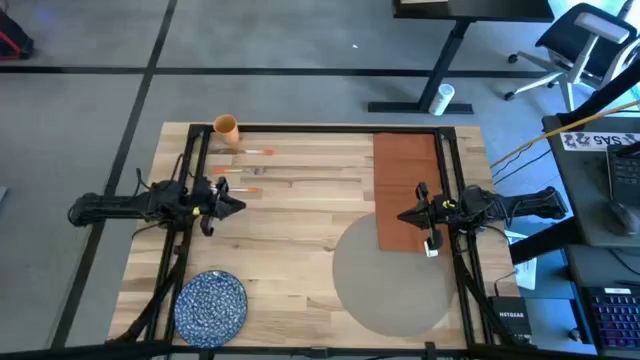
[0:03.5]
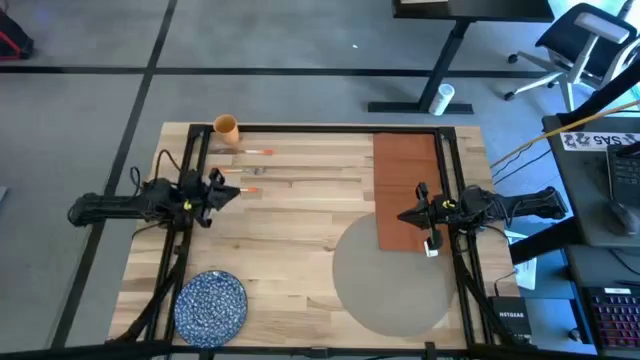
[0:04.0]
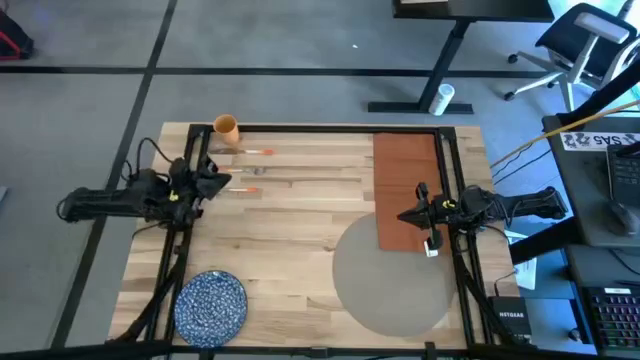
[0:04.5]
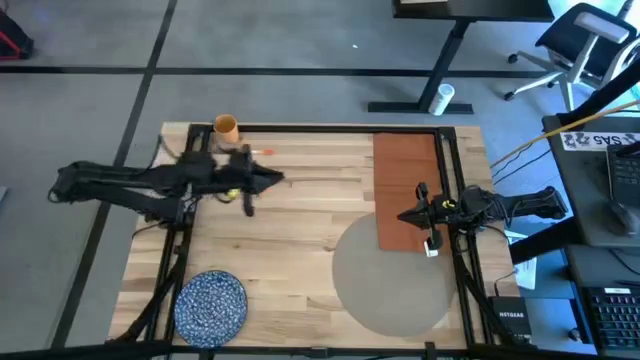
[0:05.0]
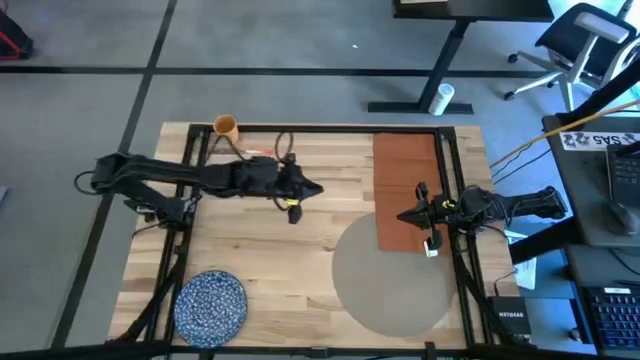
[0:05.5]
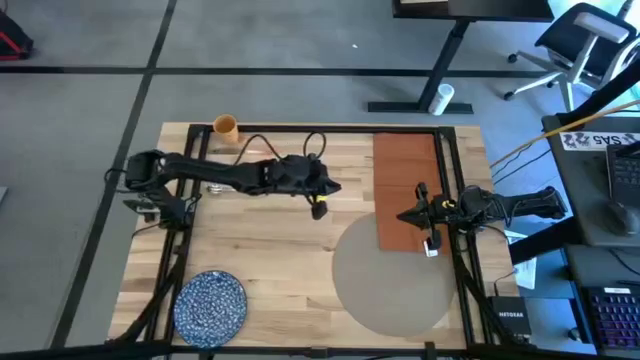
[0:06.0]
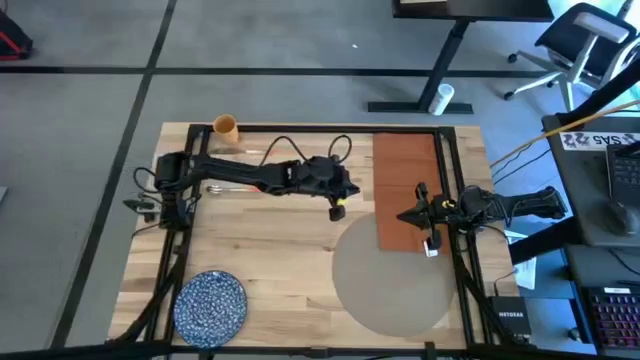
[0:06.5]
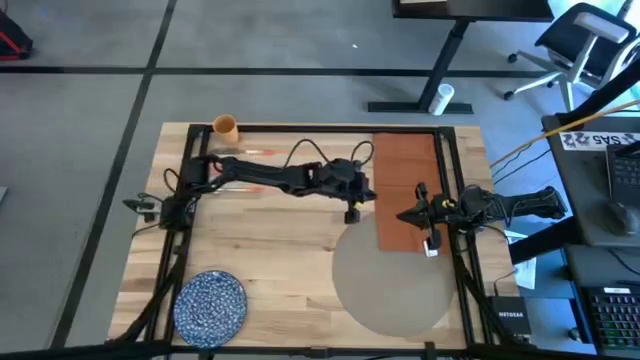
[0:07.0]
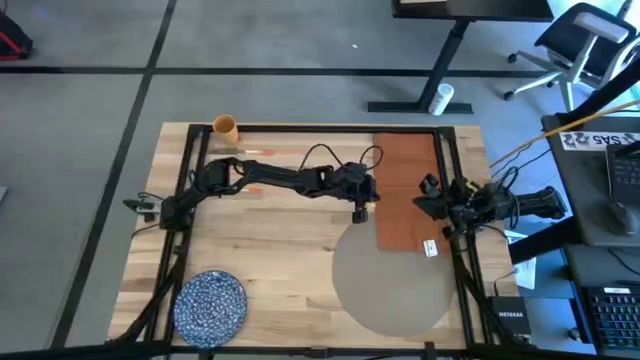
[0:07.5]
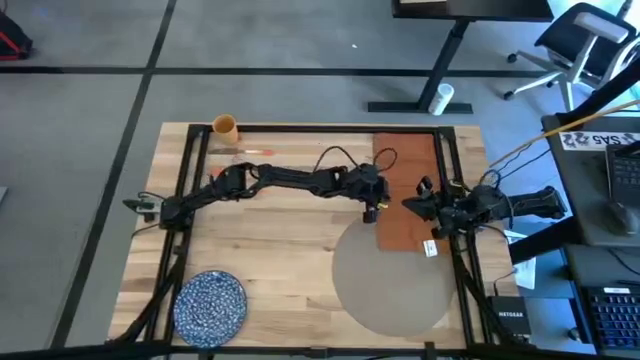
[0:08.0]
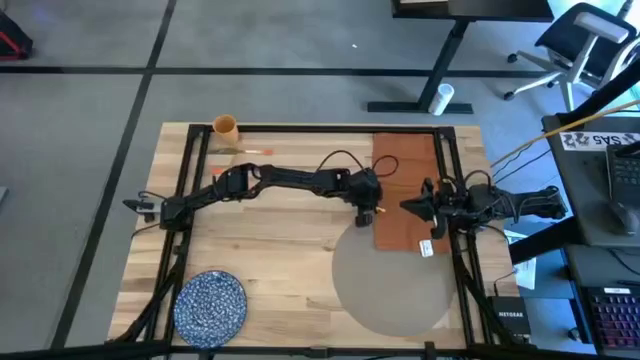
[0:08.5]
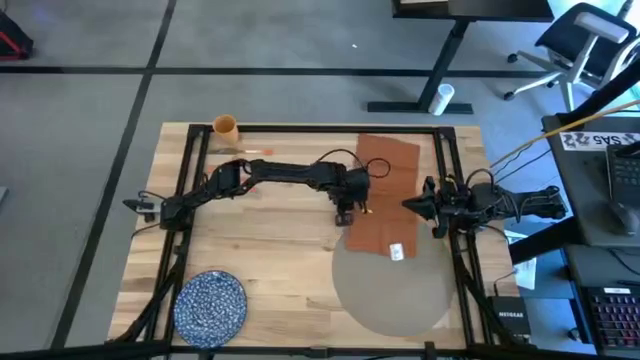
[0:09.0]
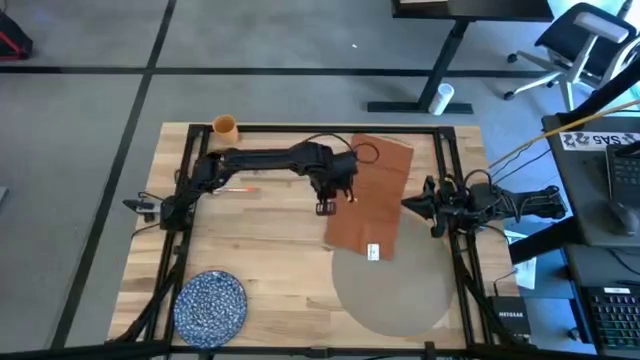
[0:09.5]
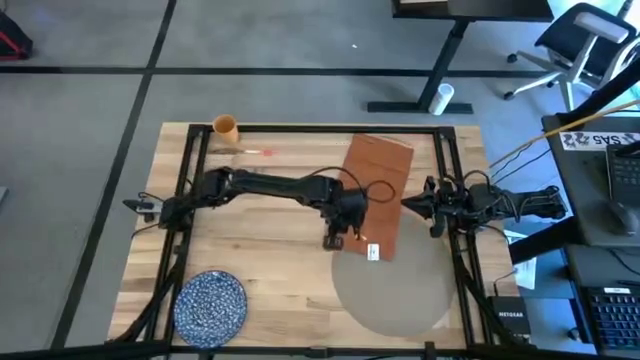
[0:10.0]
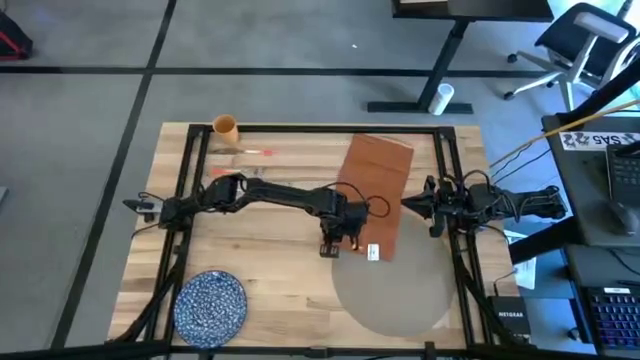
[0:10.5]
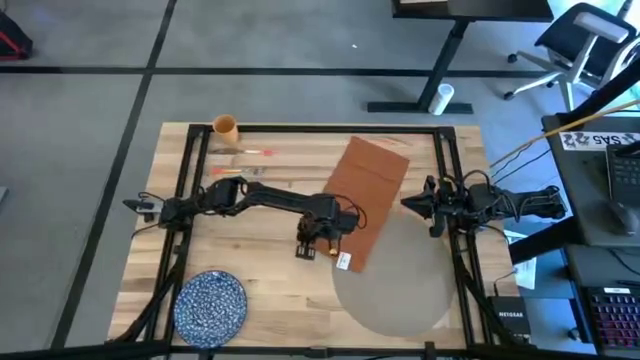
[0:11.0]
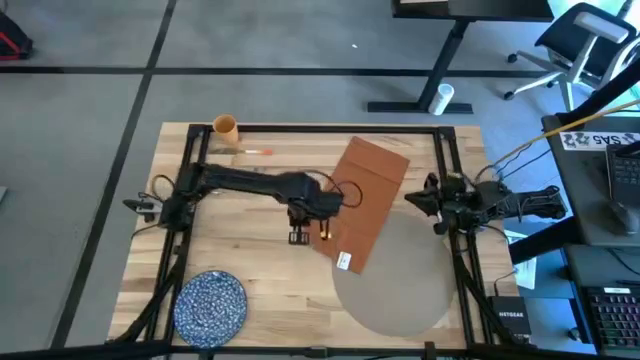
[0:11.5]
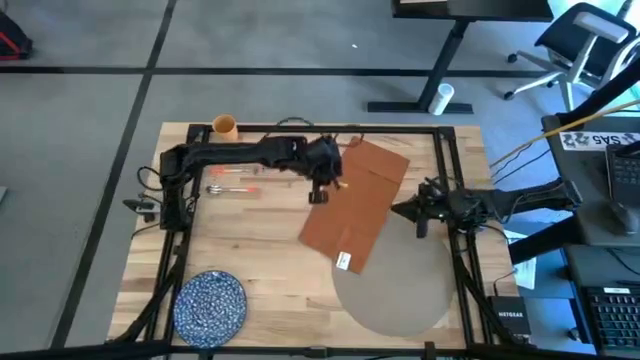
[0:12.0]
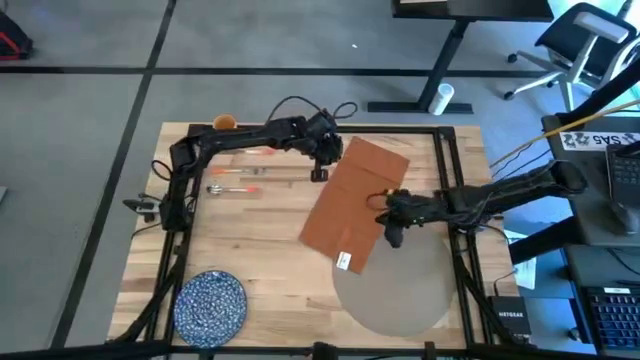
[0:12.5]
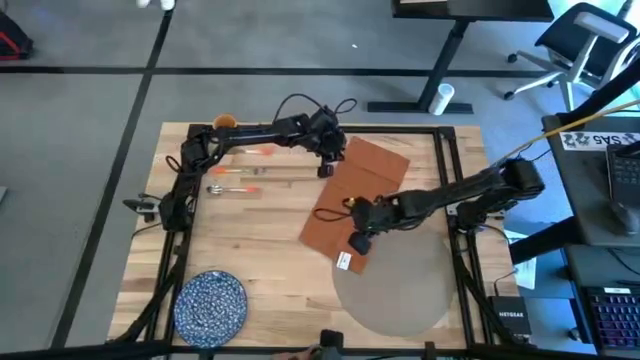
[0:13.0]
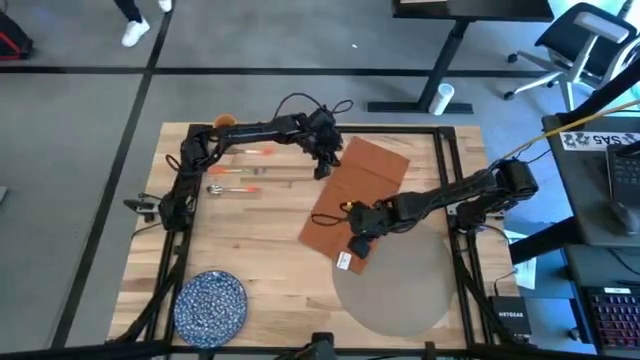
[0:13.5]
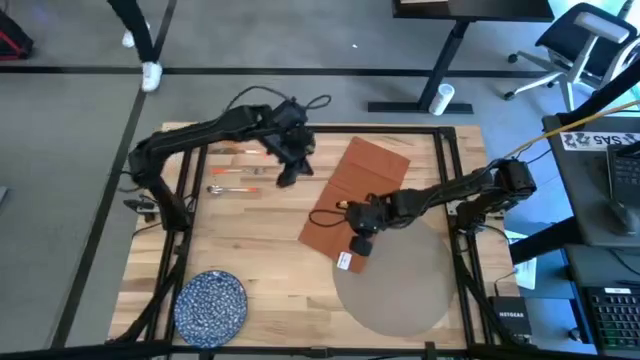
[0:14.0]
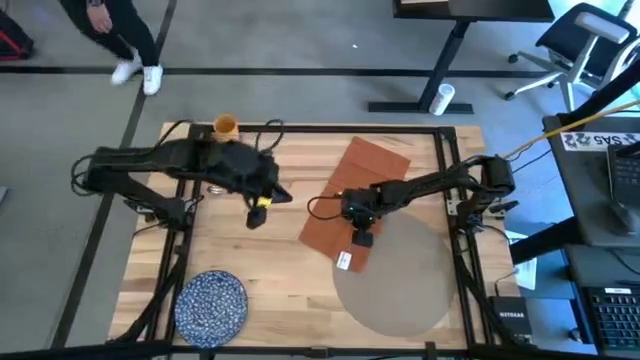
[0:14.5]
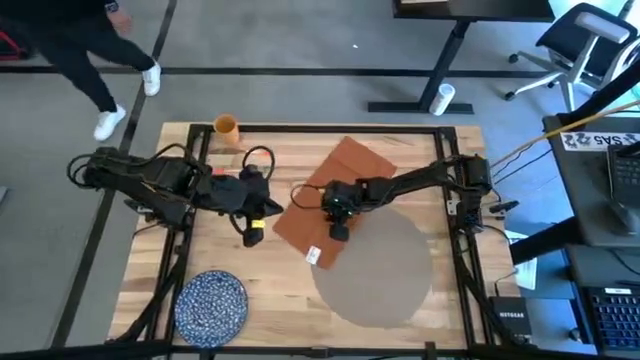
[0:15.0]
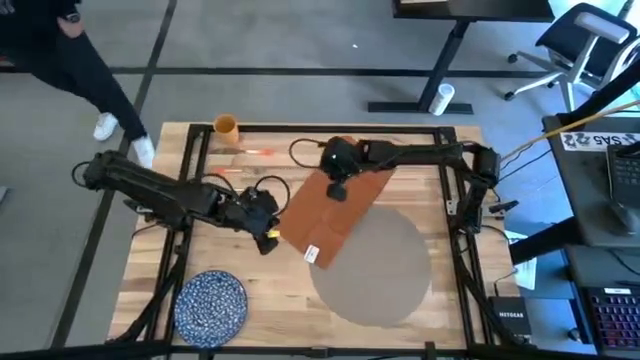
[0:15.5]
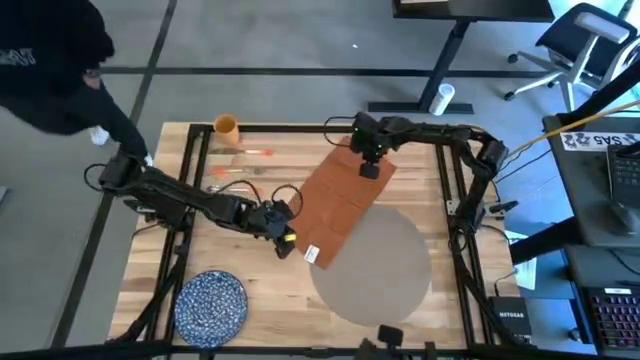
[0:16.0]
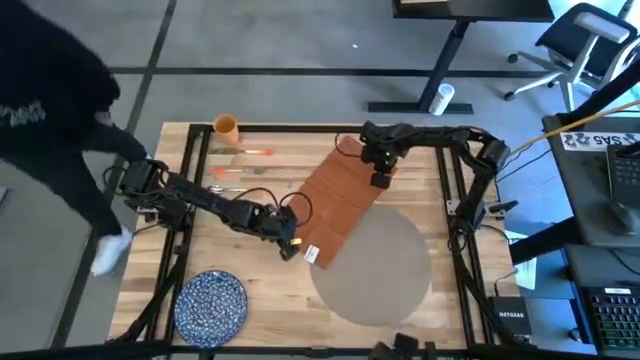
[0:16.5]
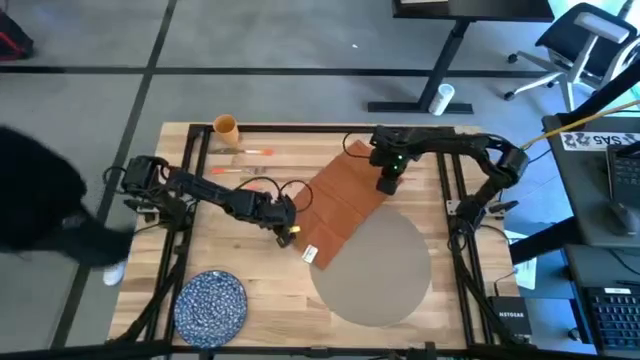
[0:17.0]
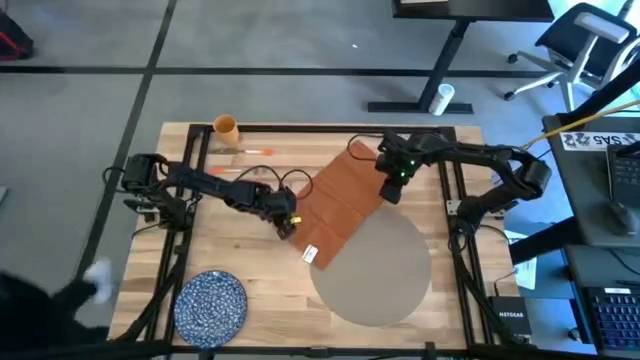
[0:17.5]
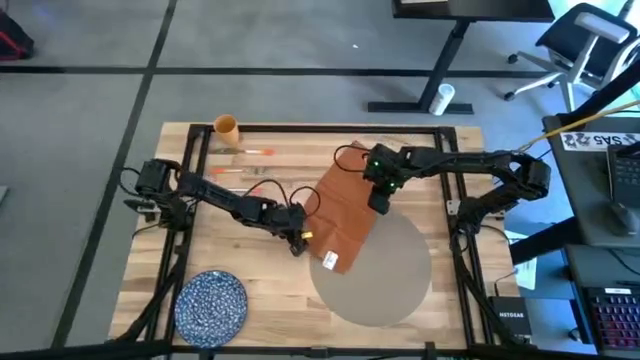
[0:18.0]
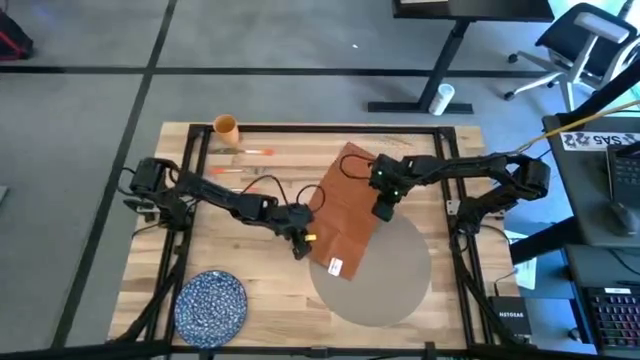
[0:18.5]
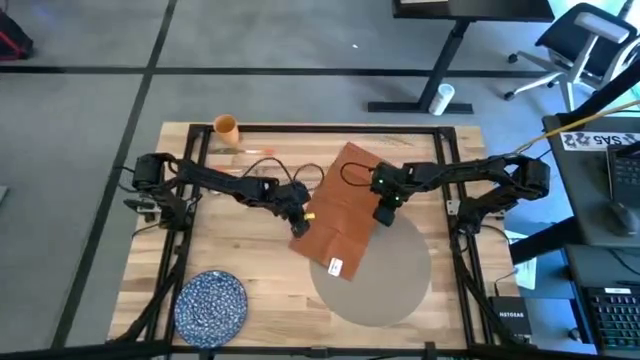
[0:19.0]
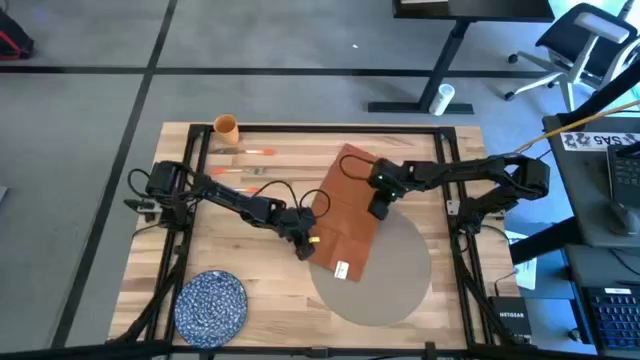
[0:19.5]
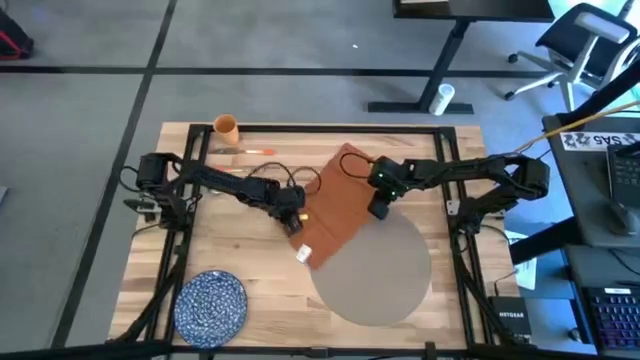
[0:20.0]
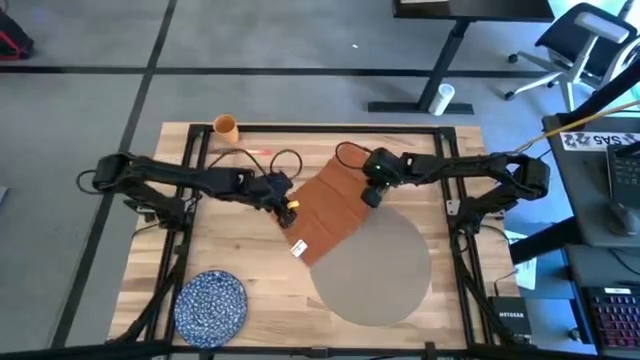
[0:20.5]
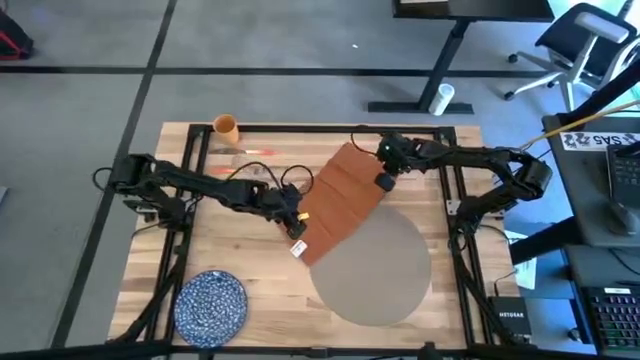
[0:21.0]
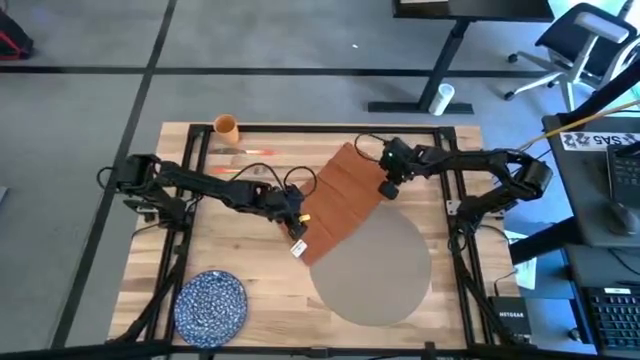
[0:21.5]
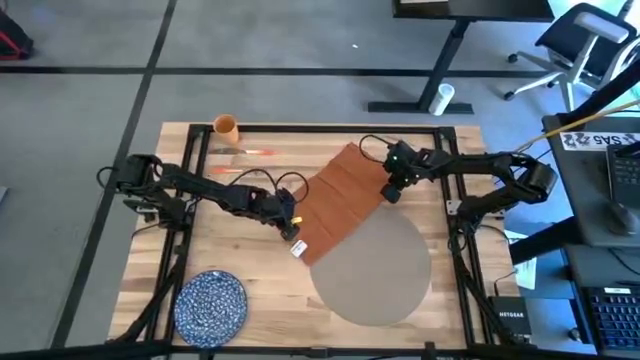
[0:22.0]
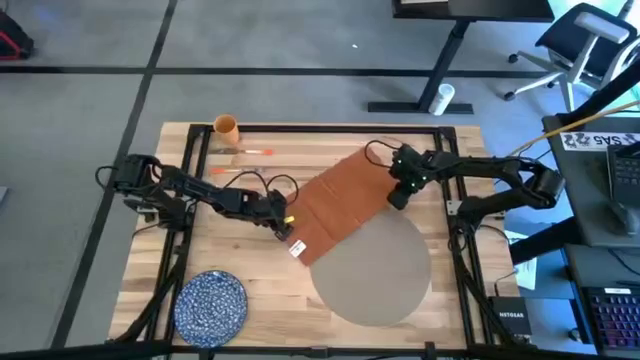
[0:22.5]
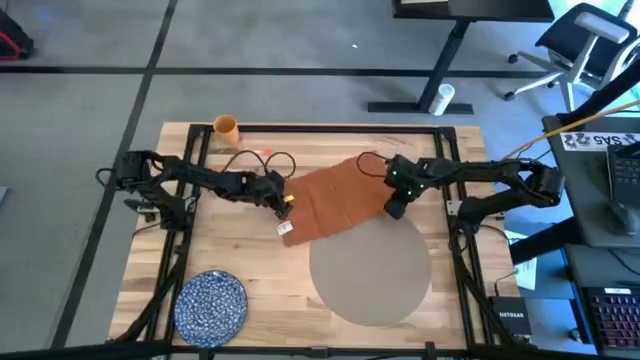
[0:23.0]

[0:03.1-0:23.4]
Task: Set table place
Fold the orange napkin
